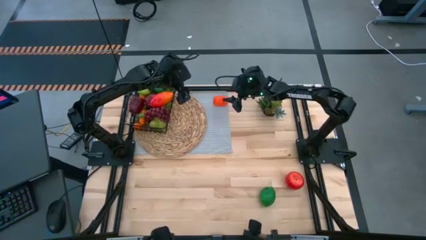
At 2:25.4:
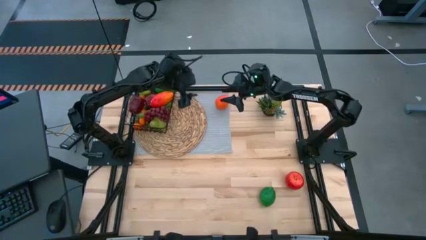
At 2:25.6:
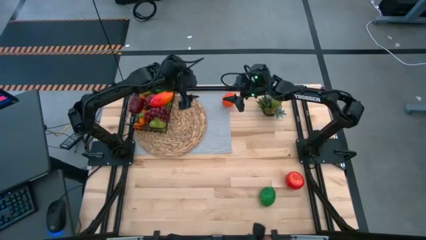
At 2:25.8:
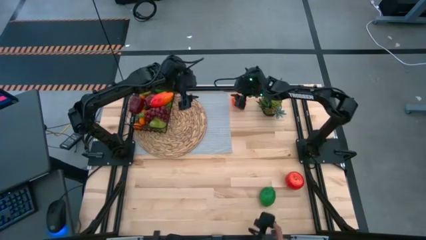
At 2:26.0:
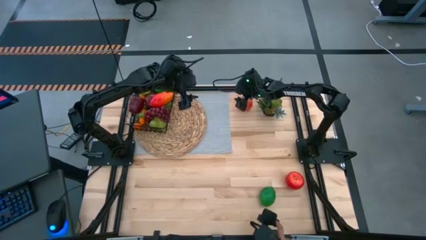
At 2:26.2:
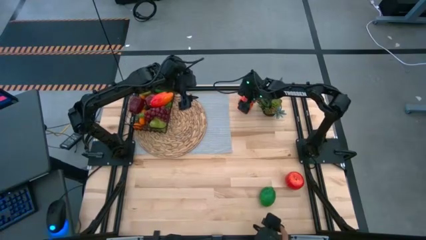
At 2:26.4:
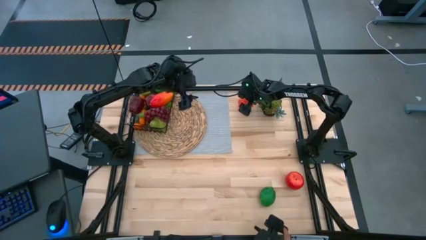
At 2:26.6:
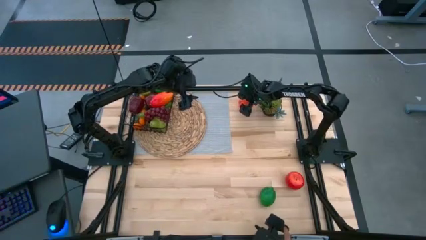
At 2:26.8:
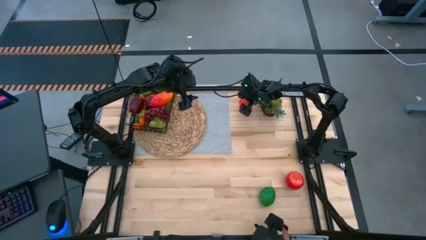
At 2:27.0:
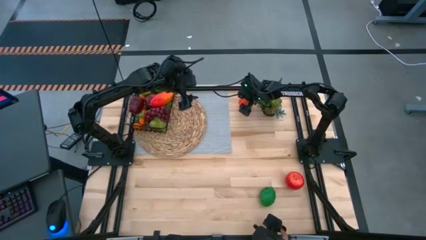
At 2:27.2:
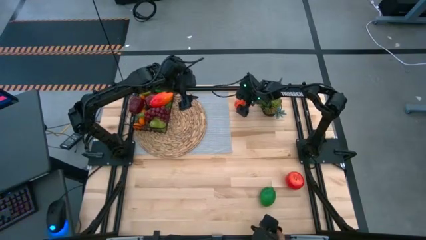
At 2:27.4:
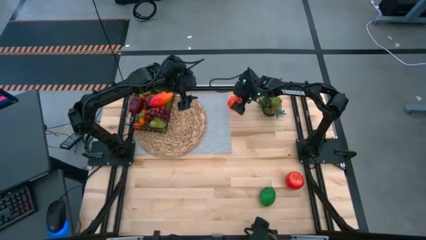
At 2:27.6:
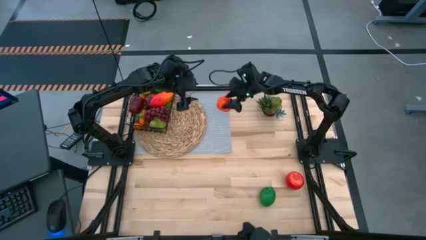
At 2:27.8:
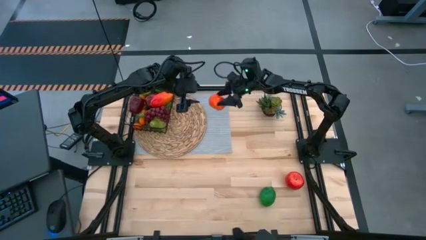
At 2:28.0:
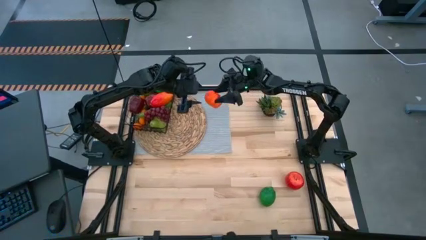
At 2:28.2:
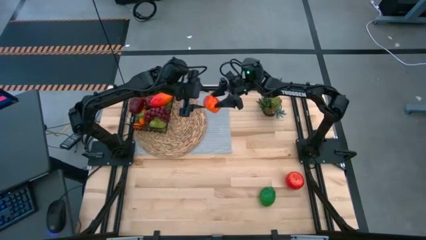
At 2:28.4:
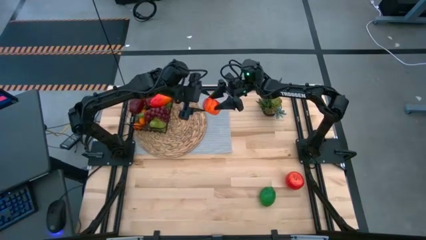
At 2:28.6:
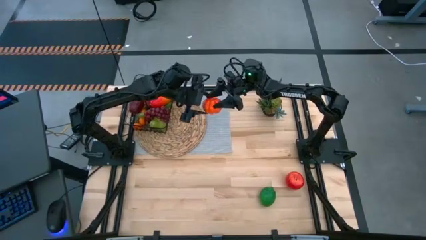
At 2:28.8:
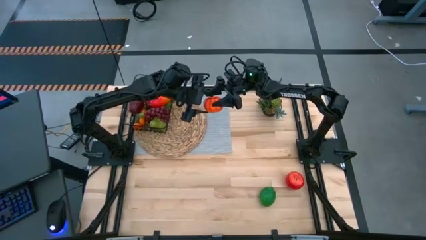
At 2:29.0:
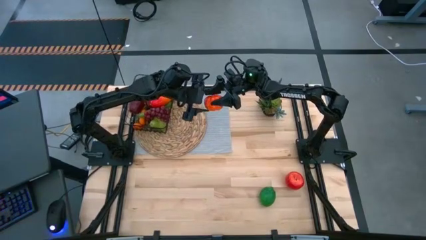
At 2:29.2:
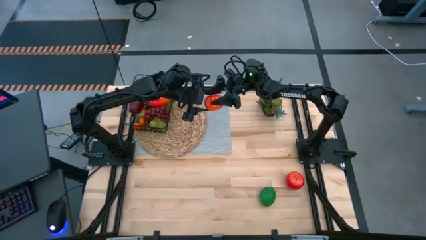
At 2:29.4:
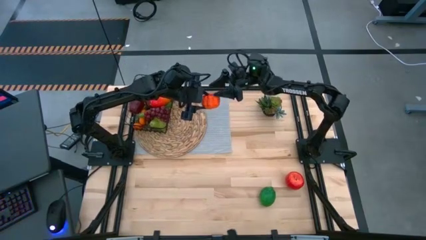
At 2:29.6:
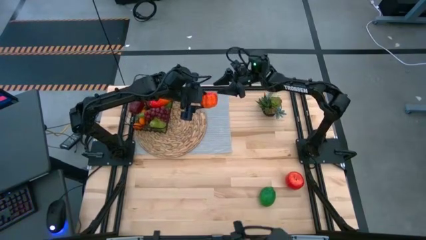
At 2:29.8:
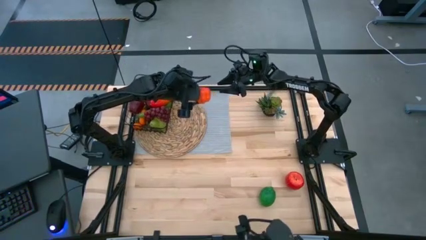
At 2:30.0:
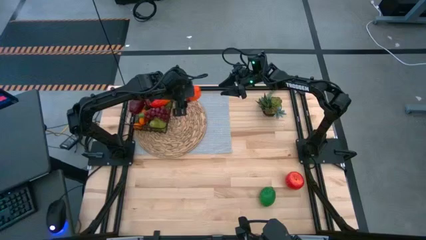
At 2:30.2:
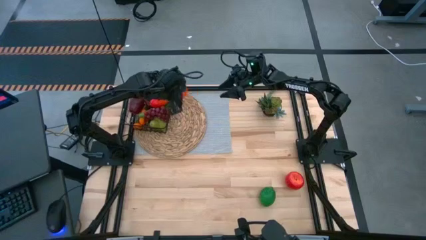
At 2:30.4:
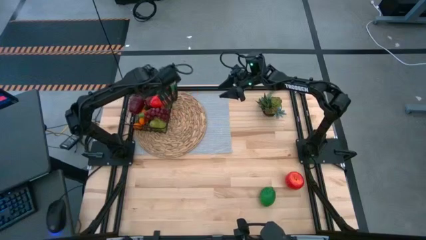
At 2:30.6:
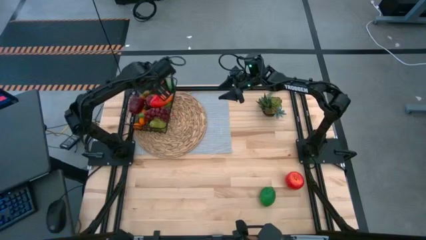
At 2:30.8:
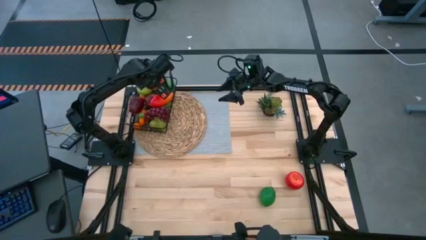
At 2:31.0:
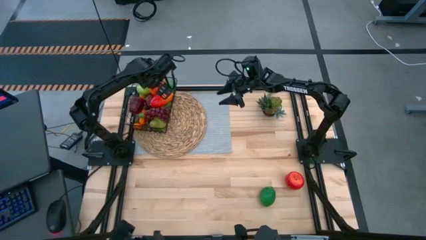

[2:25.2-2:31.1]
Task: Build produce basket
Put the orange pumpkin into the wire basket

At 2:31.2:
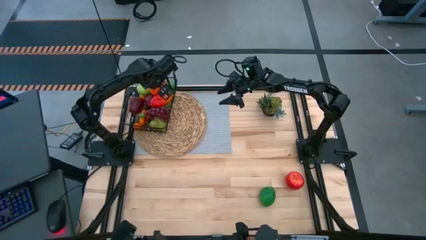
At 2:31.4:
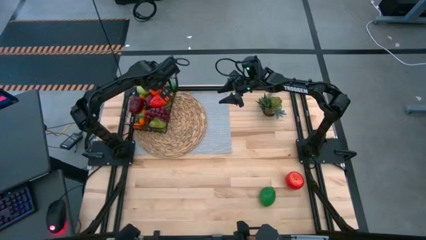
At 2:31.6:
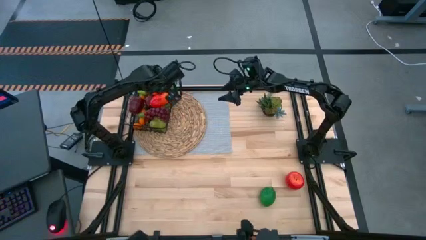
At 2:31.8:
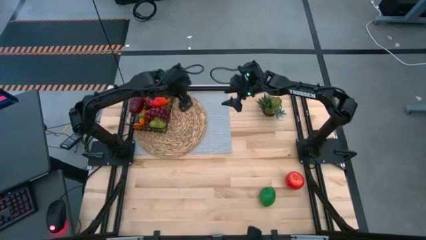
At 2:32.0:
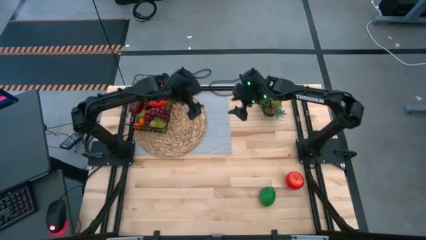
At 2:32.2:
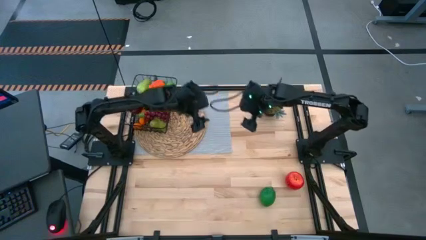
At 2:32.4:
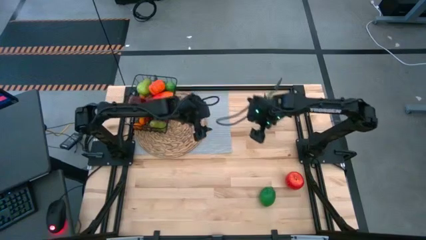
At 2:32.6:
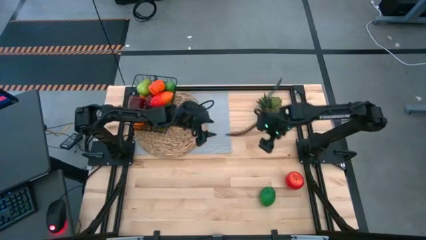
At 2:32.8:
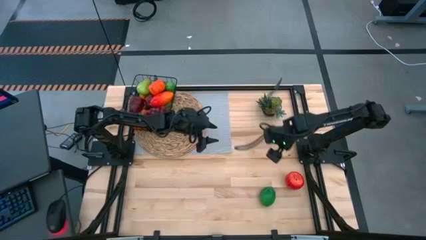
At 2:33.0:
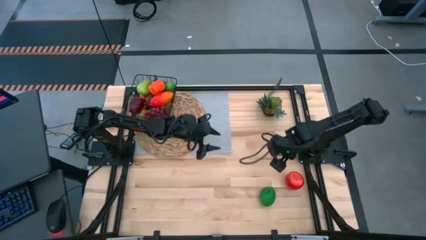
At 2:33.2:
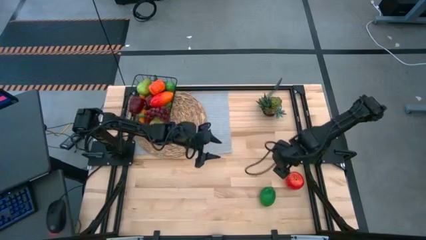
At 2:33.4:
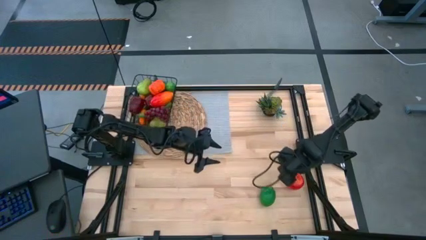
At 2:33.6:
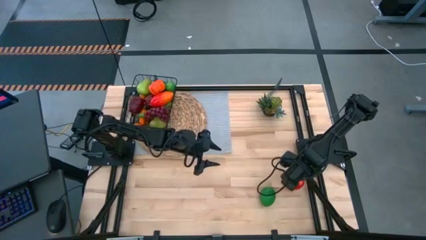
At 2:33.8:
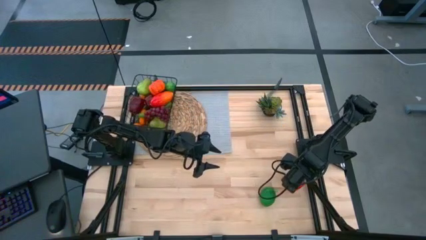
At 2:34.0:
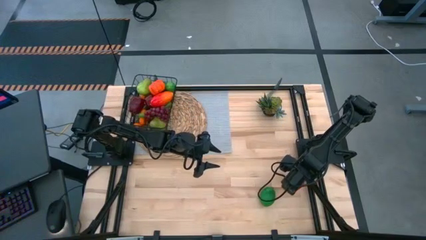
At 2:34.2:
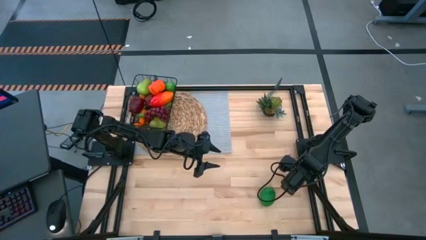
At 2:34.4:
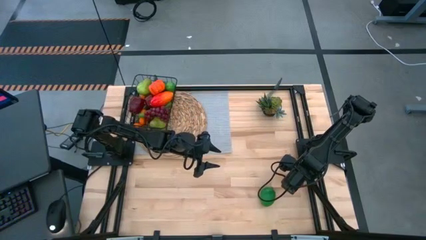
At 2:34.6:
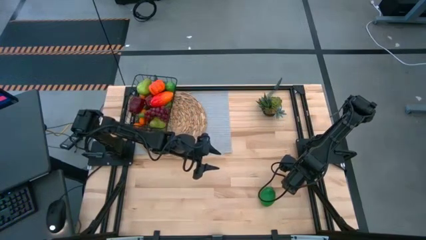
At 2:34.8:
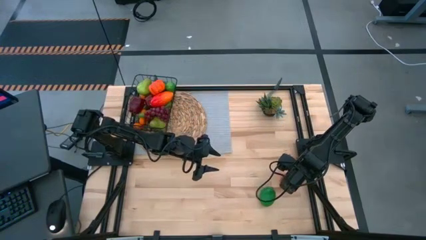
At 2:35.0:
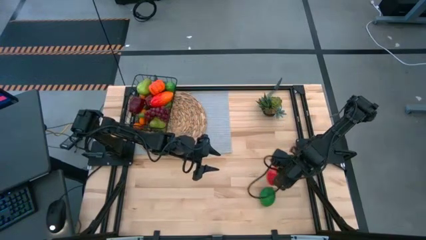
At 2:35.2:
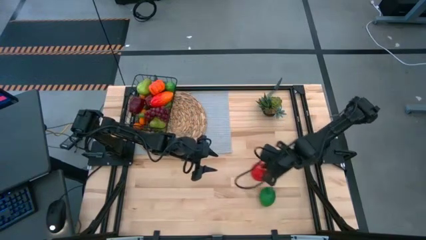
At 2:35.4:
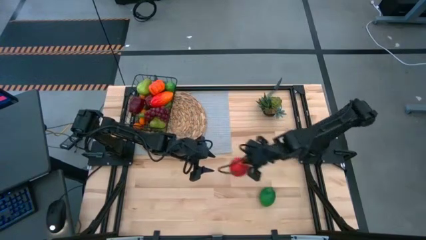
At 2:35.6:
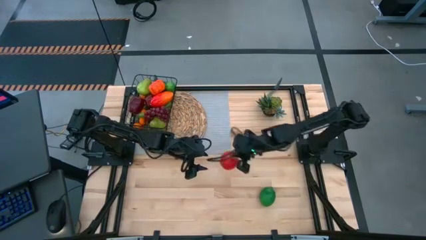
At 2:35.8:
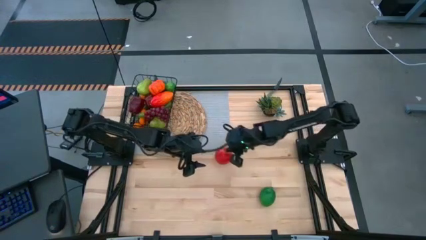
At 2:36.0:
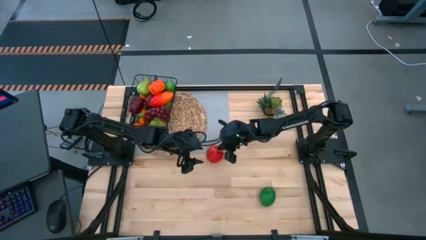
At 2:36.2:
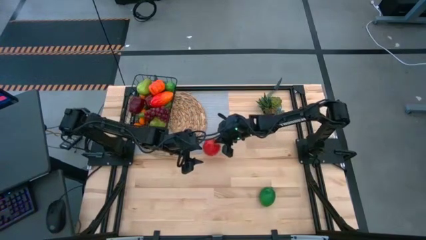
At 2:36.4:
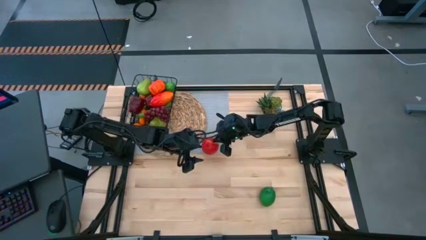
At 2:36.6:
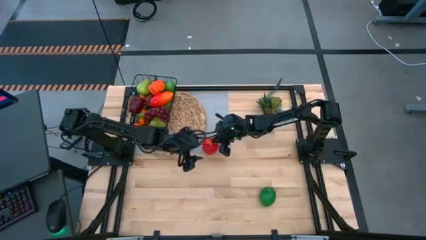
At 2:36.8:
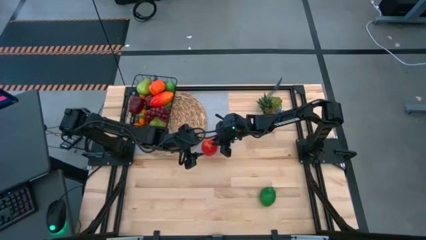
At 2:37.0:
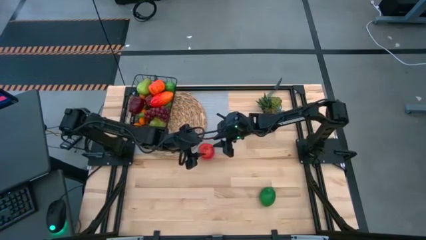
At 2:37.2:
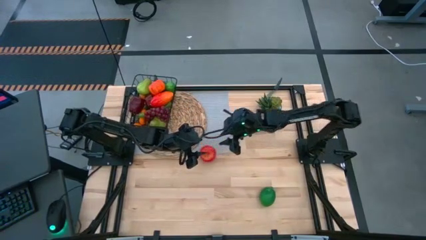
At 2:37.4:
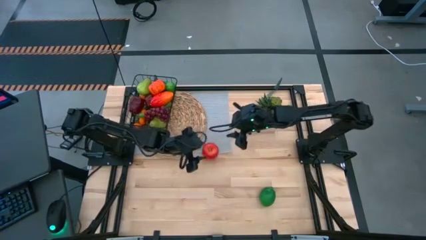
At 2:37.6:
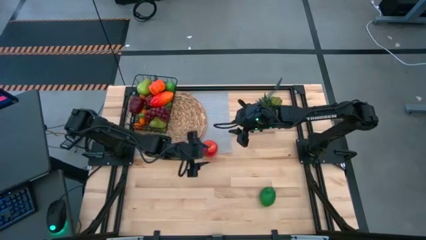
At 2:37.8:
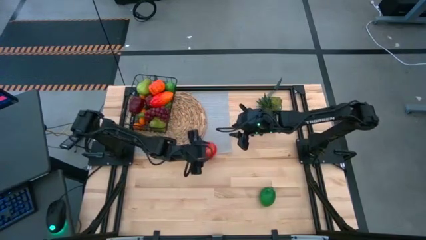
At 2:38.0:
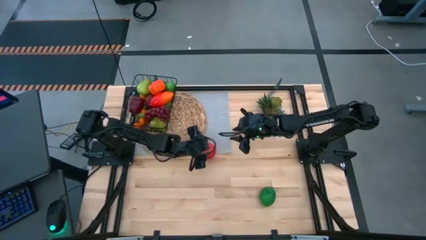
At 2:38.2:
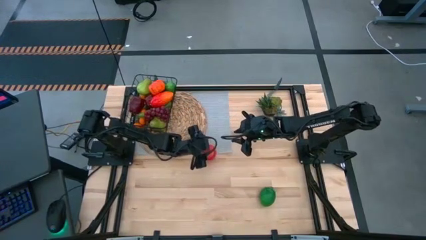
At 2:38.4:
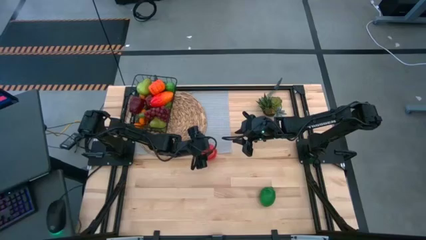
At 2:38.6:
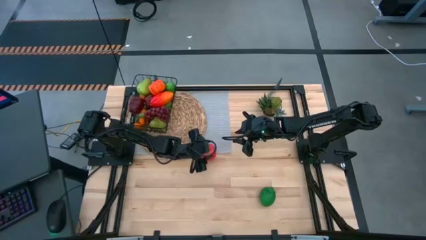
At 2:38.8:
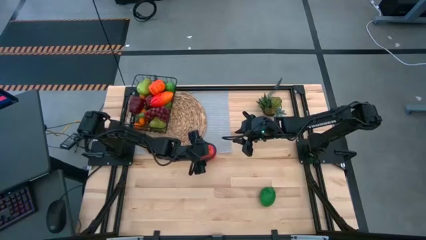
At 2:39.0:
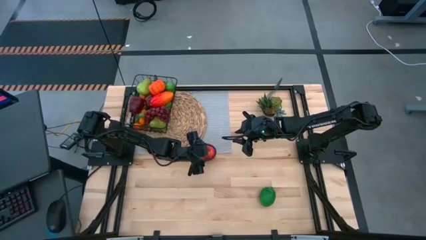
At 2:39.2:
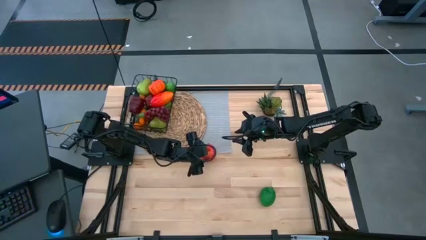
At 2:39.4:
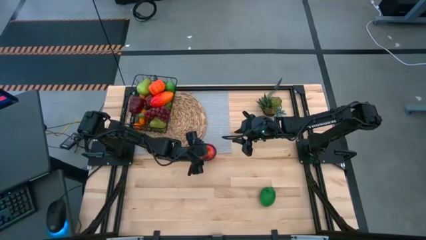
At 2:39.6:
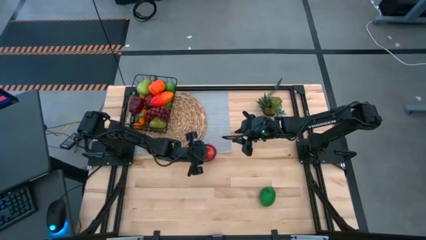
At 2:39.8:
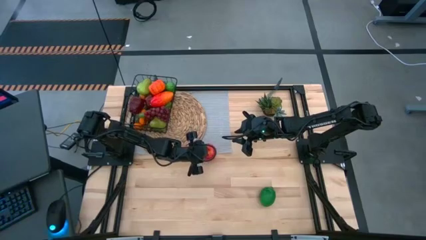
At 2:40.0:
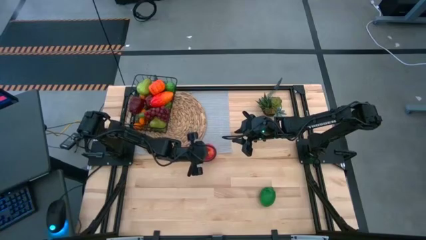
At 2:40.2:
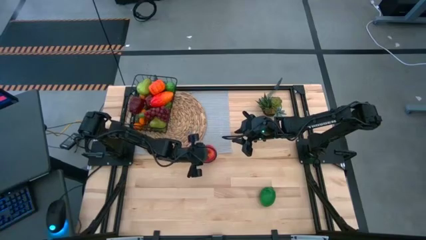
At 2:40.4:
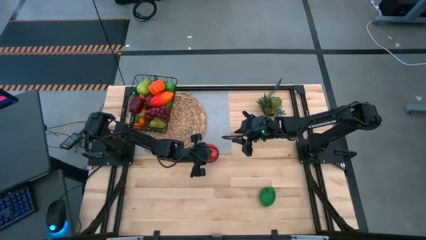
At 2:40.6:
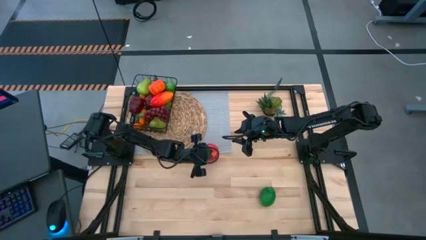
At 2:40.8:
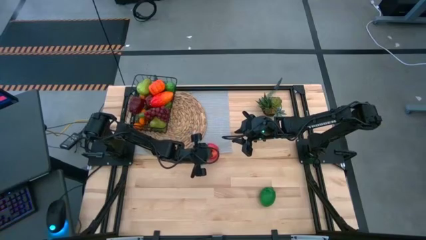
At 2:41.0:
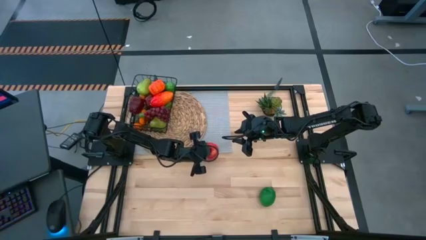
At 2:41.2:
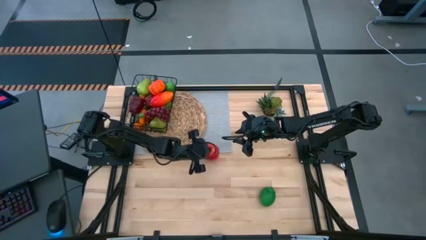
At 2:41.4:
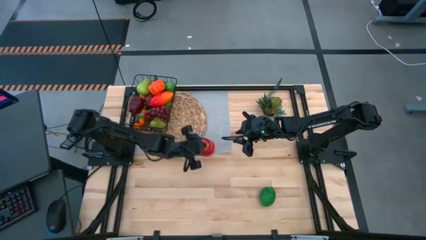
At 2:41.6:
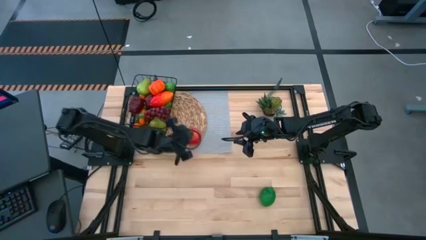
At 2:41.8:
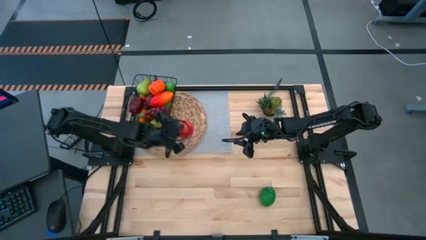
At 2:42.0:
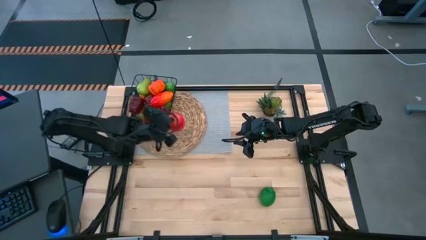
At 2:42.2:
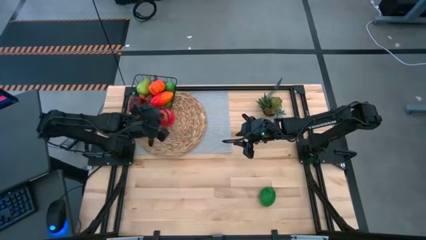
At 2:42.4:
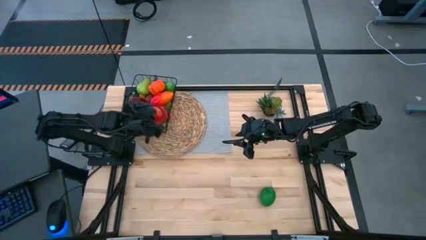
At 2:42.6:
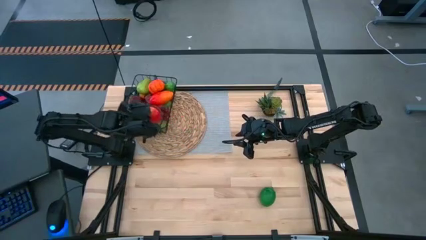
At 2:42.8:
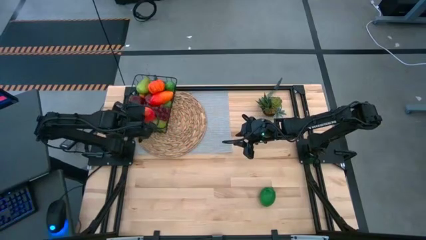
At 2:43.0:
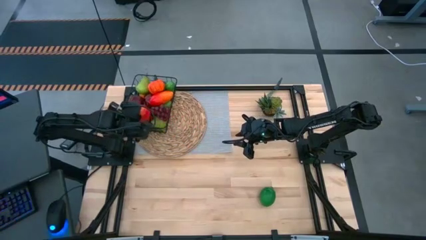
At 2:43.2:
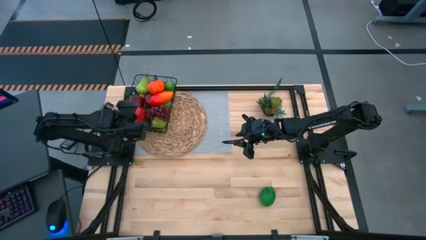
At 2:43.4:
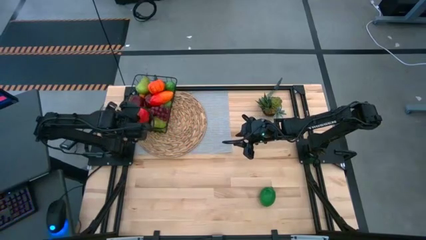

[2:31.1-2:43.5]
Put the red apple into the wire basket
